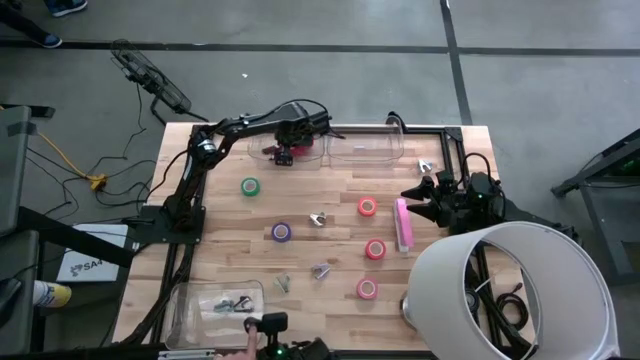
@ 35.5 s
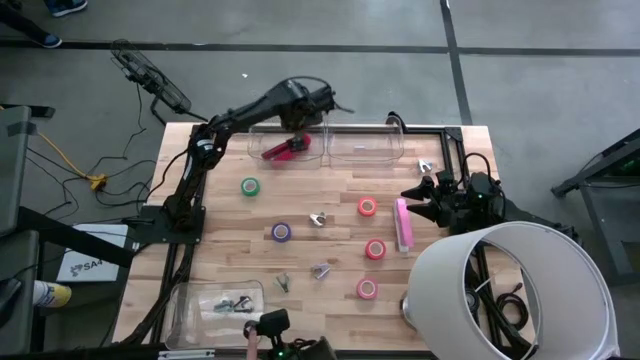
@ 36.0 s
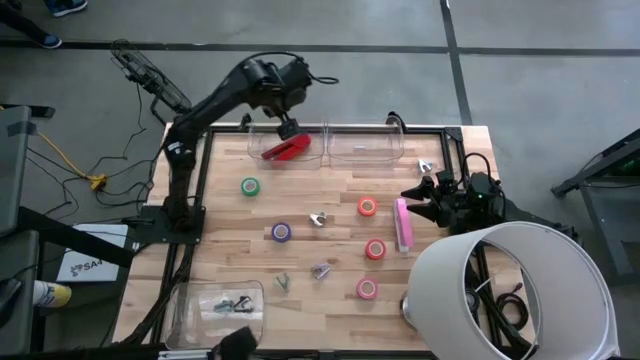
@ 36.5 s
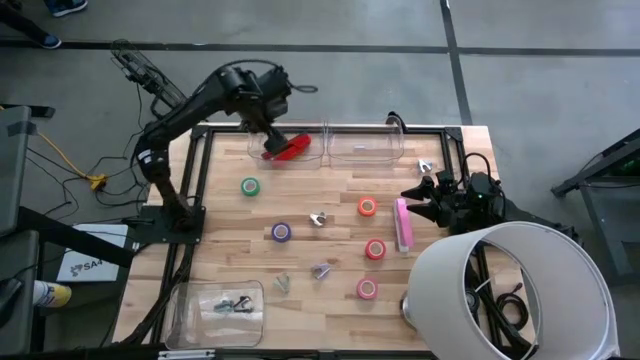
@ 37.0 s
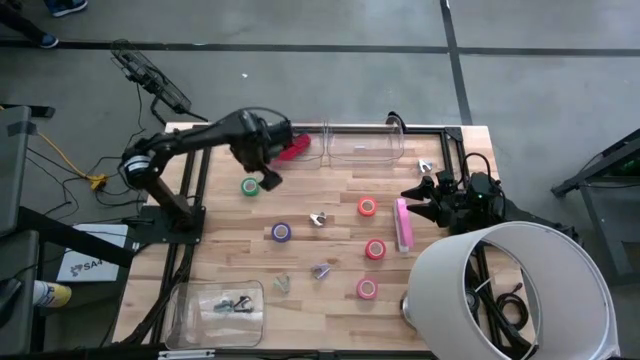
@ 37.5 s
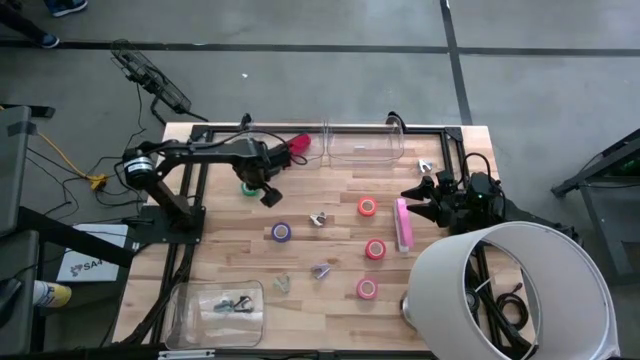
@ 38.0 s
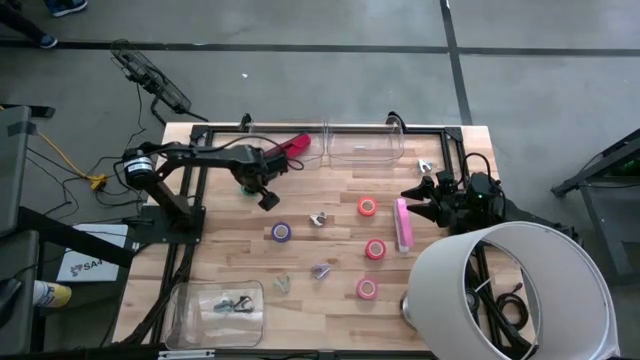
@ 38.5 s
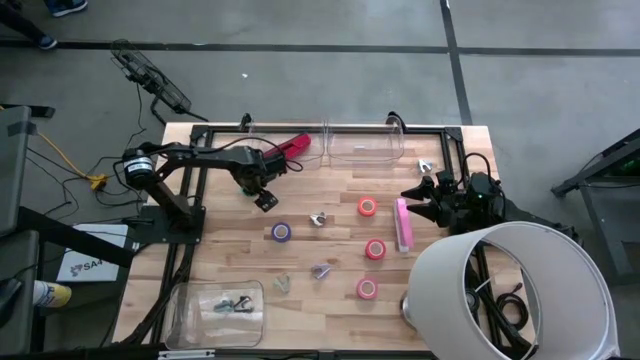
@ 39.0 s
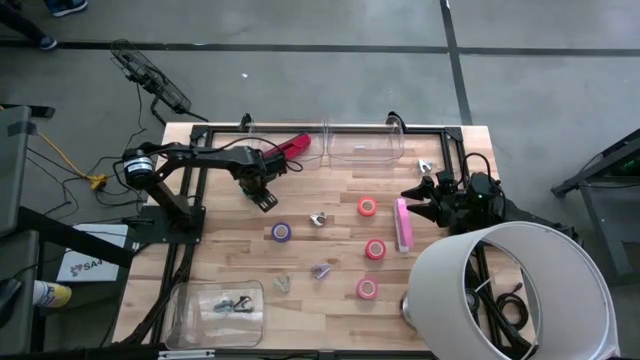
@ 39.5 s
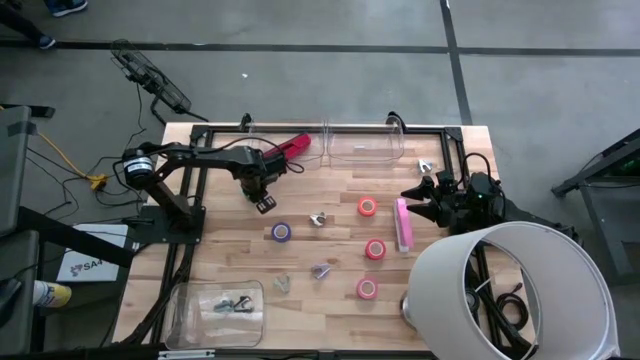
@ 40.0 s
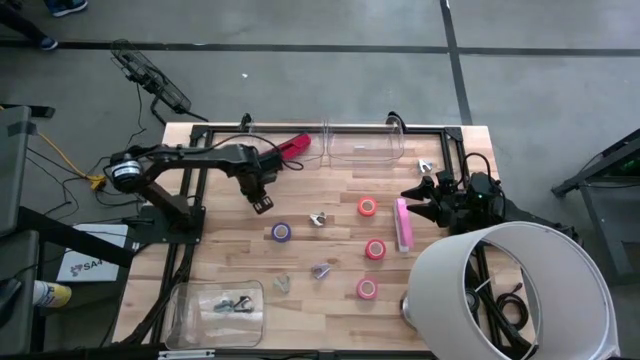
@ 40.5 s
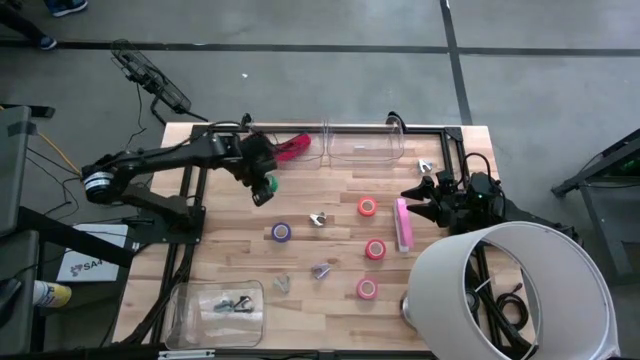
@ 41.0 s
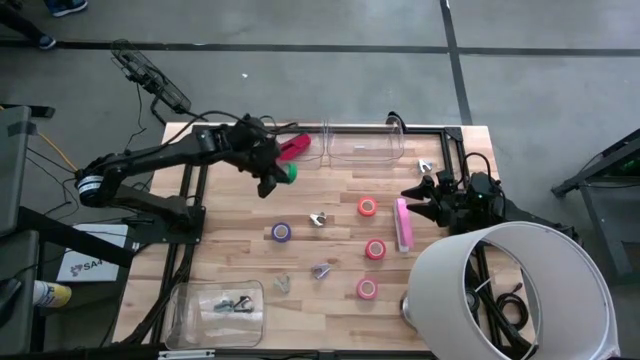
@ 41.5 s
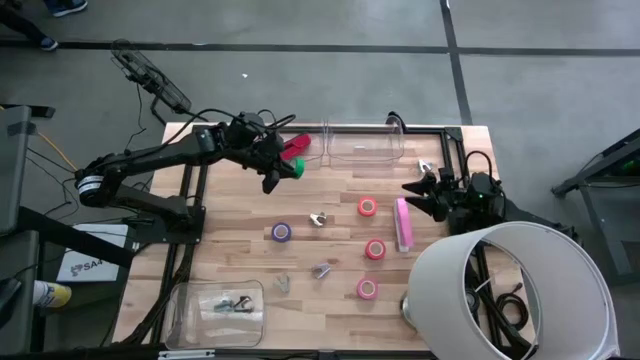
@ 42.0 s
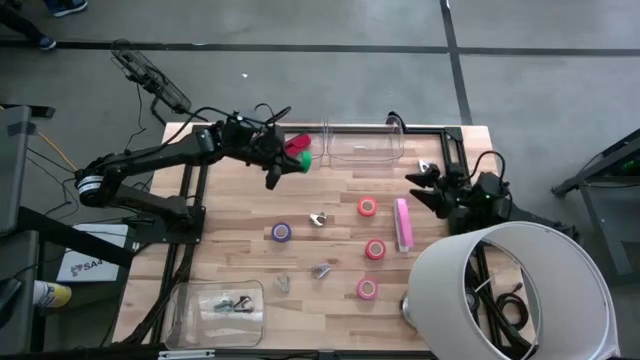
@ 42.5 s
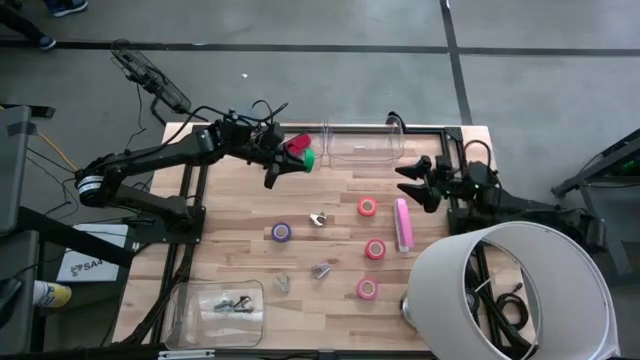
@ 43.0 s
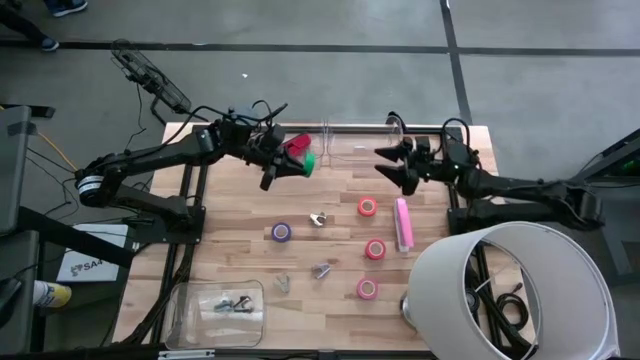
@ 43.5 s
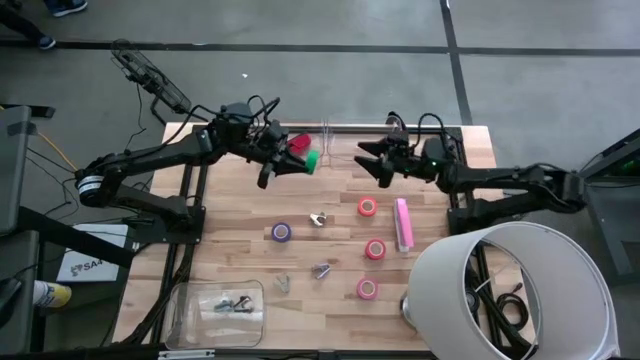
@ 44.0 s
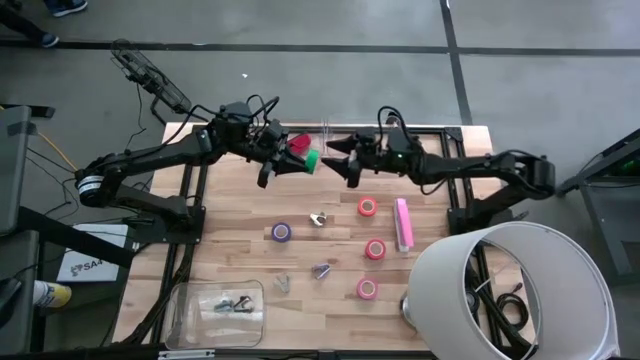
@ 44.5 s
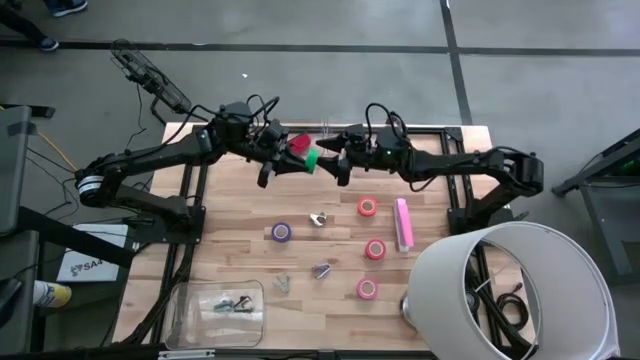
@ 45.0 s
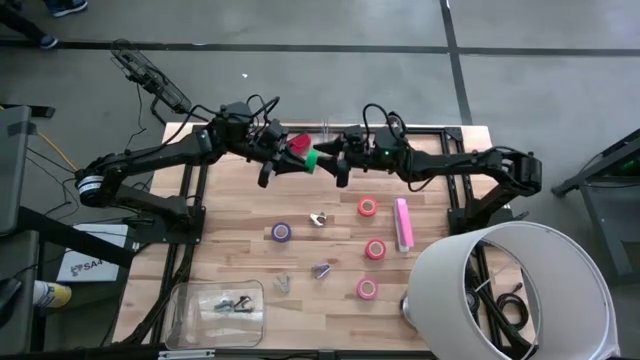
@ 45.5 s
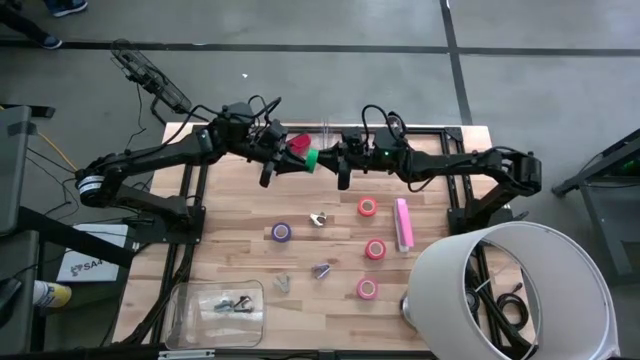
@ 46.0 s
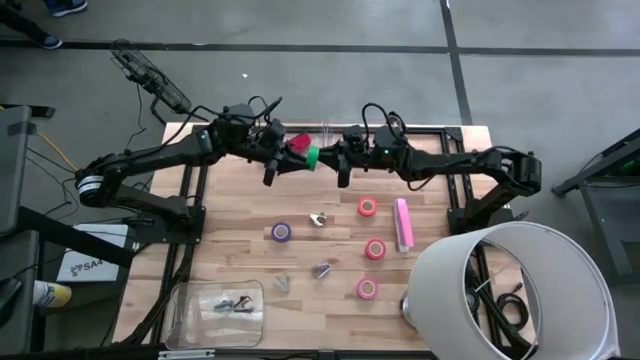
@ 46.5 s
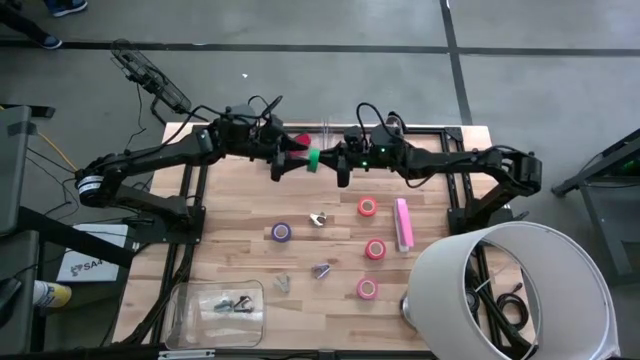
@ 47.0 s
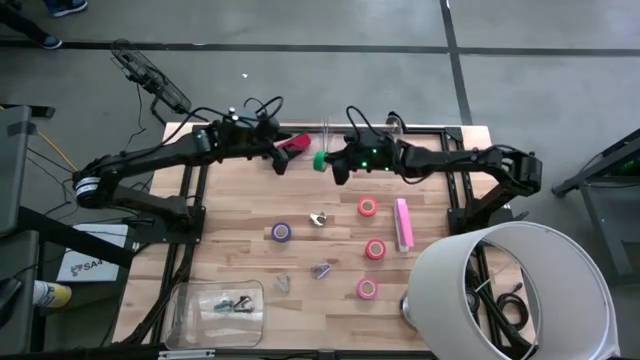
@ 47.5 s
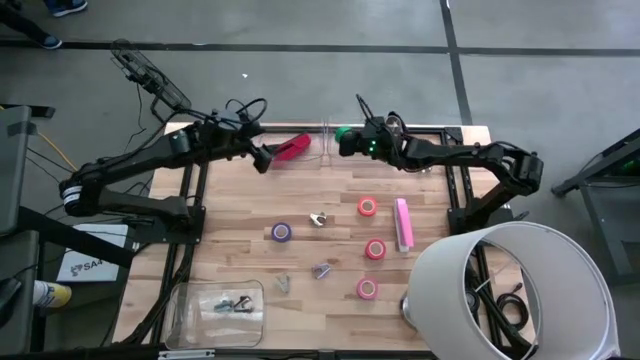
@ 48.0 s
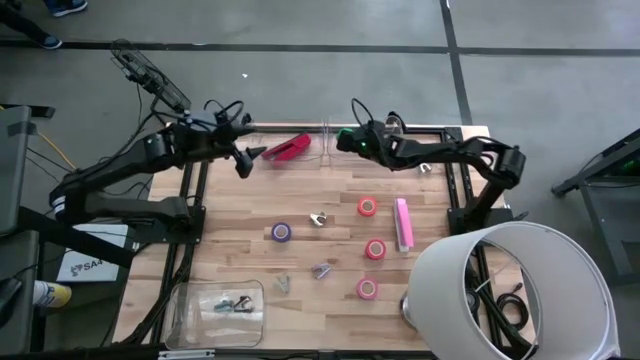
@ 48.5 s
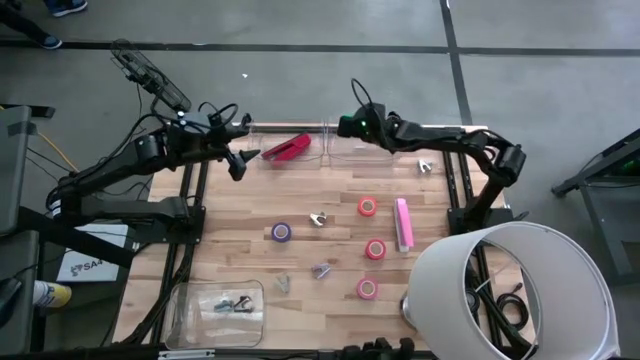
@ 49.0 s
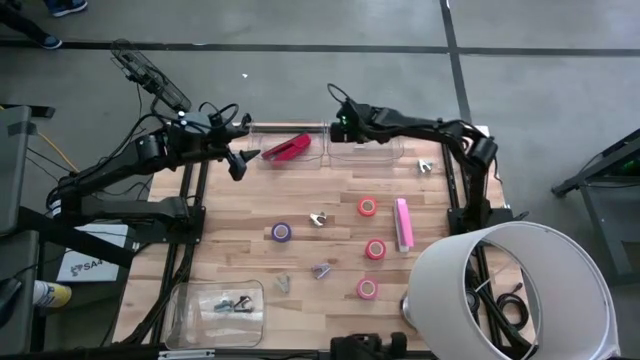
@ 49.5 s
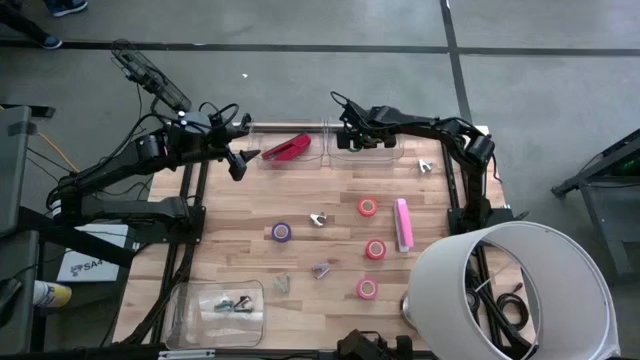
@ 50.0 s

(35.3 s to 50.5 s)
Task: Pick and place Stapler, Stapler remover, tape
Put the green tape into the top right transparent bin

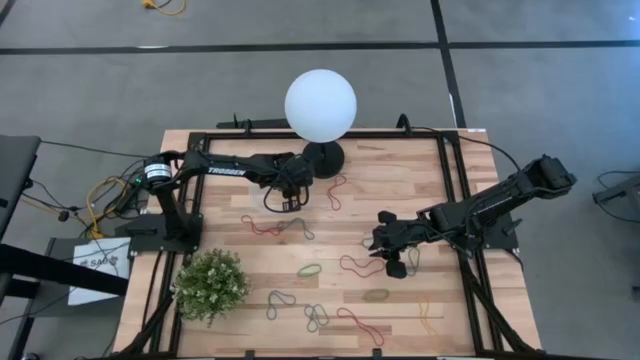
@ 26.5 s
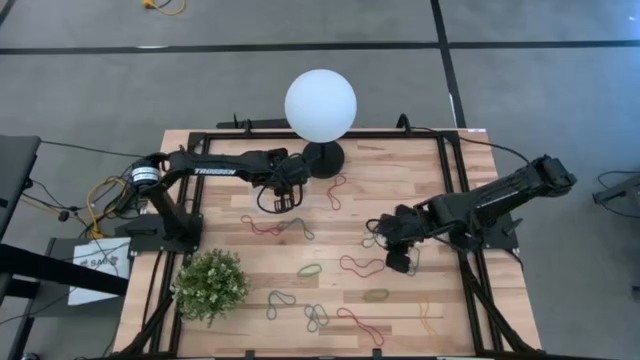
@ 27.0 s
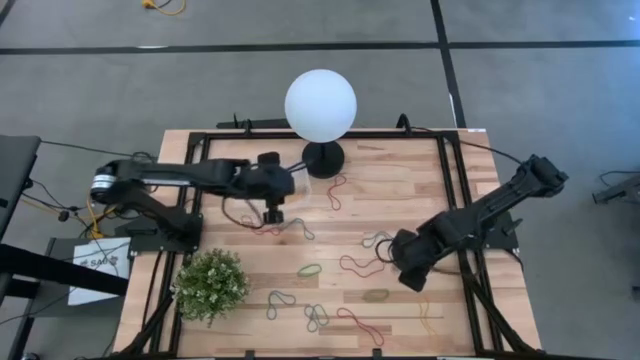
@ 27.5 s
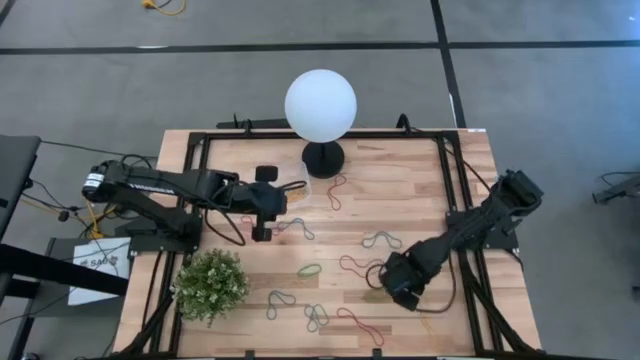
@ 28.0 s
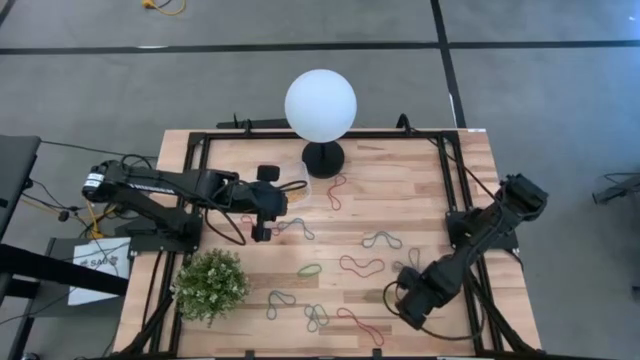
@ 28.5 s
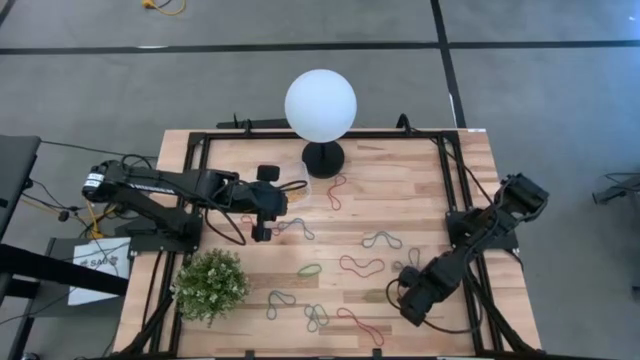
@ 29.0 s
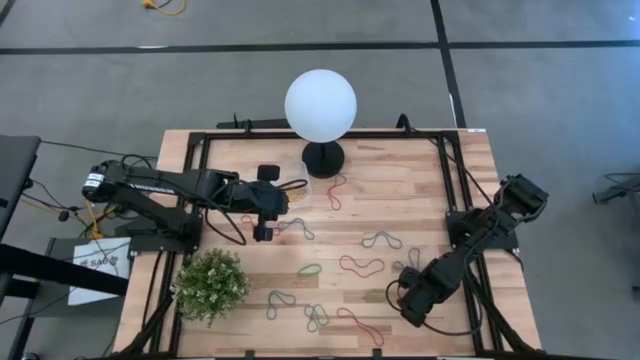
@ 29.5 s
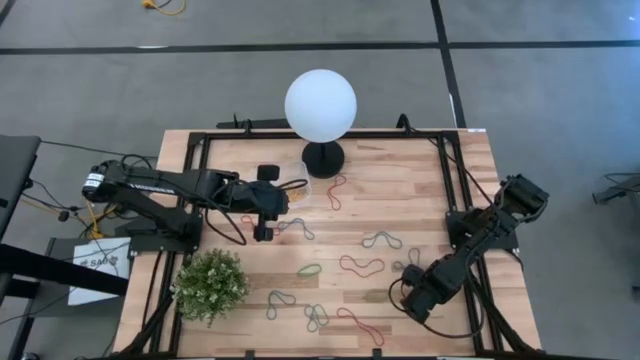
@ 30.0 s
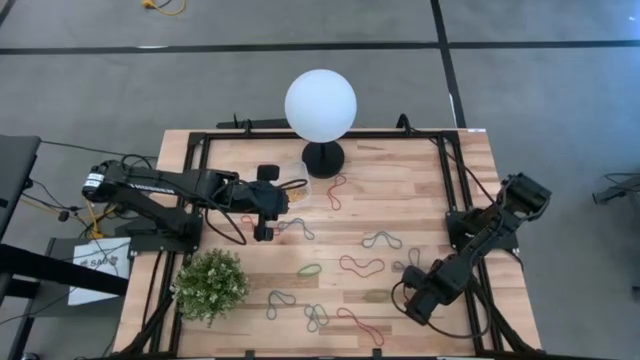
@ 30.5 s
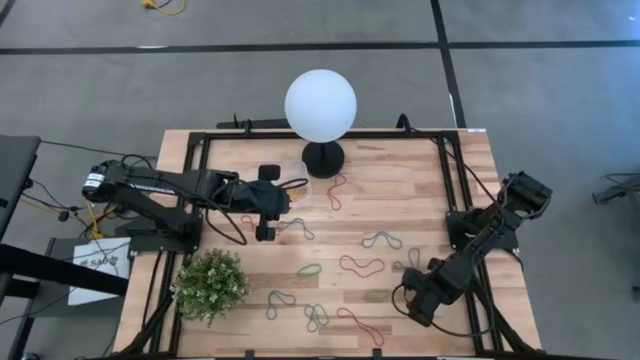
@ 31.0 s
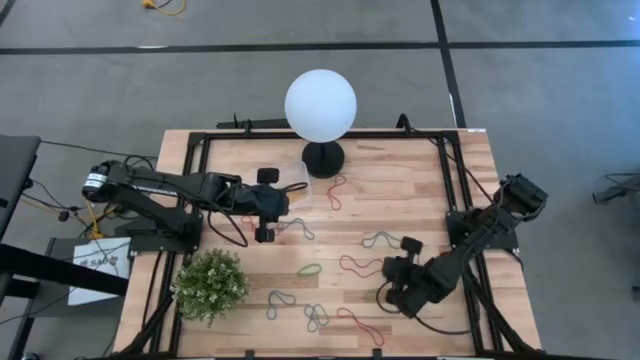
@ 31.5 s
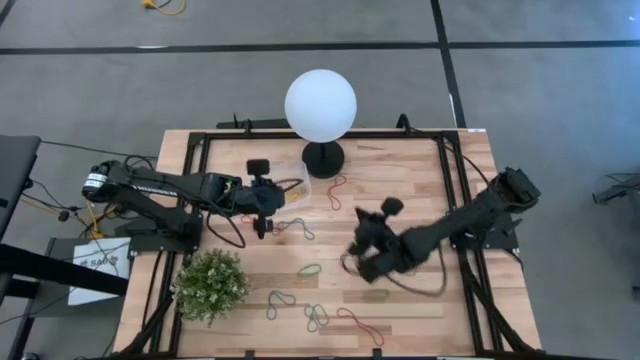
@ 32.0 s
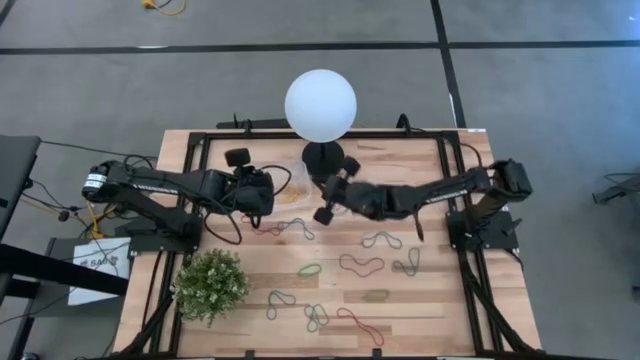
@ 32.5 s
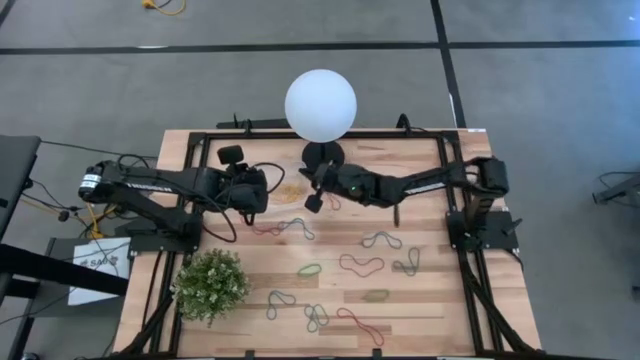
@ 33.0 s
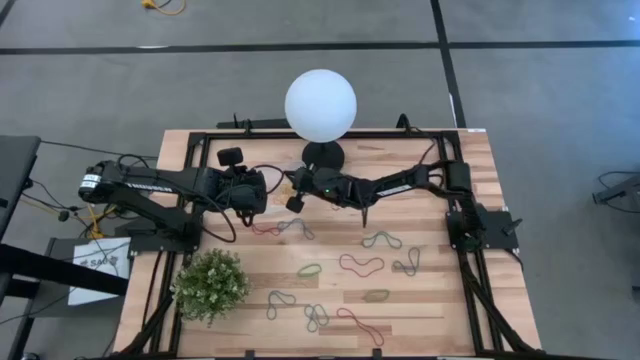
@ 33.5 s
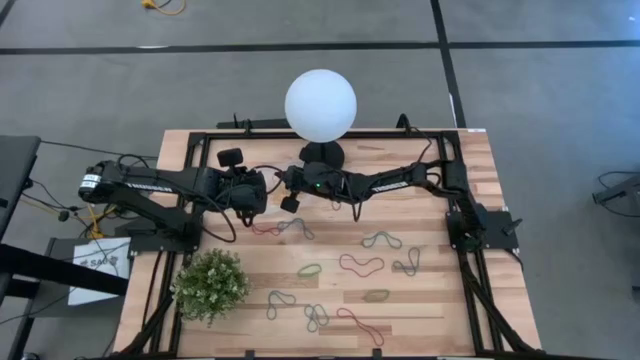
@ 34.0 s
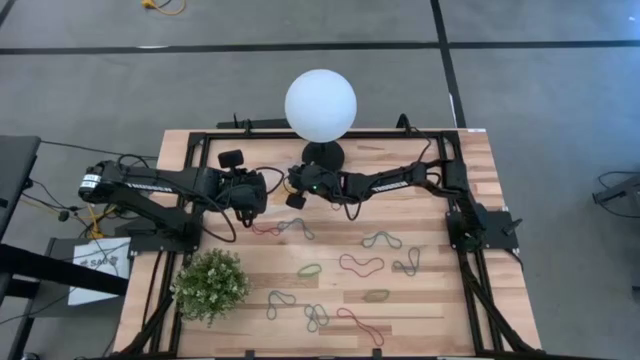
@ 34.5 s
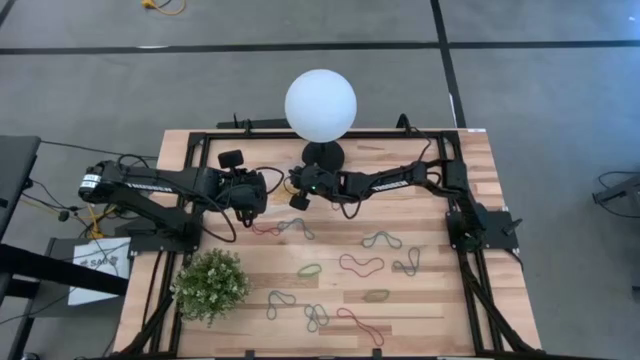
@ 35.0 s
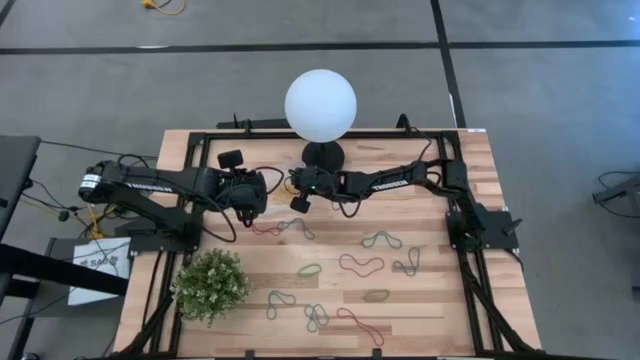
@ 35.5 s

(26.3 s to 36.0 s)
Task: Pick and place items into bin
Put the yellow rubber band into the transparent bin
